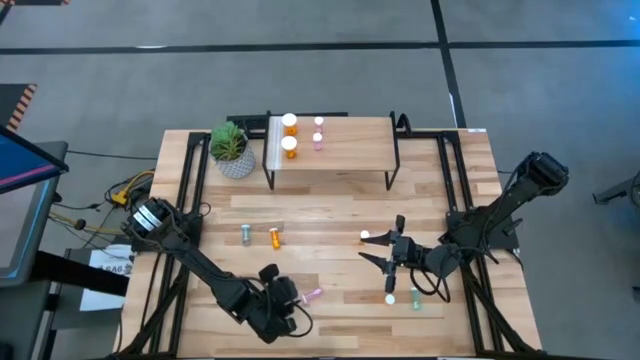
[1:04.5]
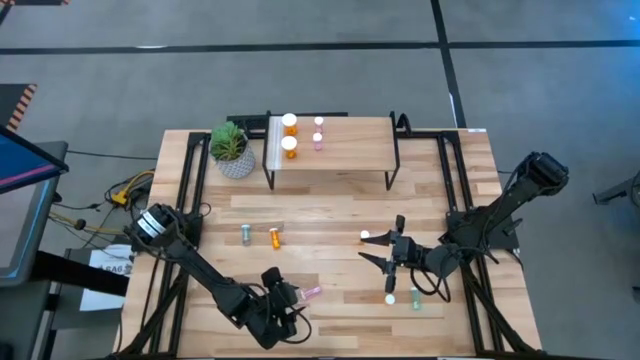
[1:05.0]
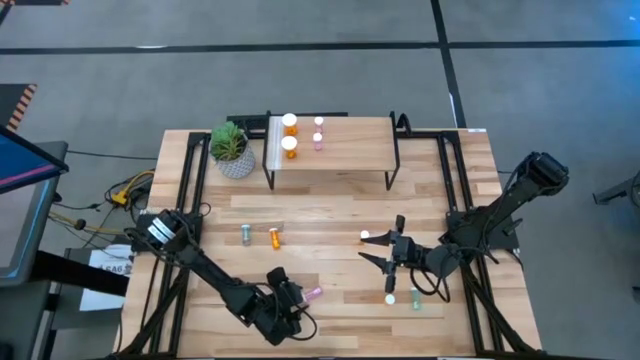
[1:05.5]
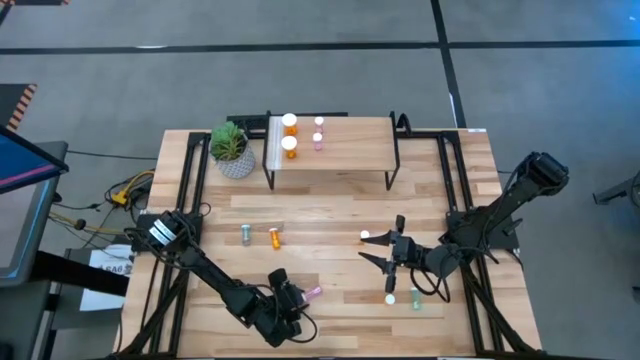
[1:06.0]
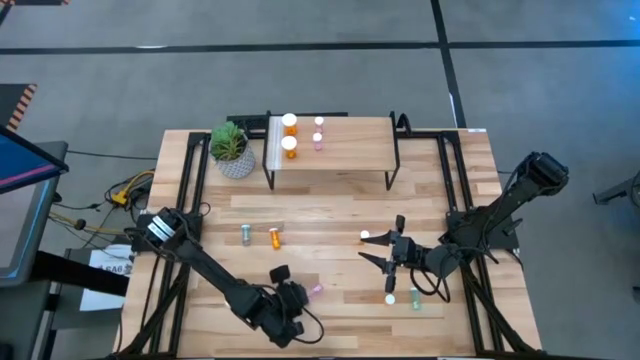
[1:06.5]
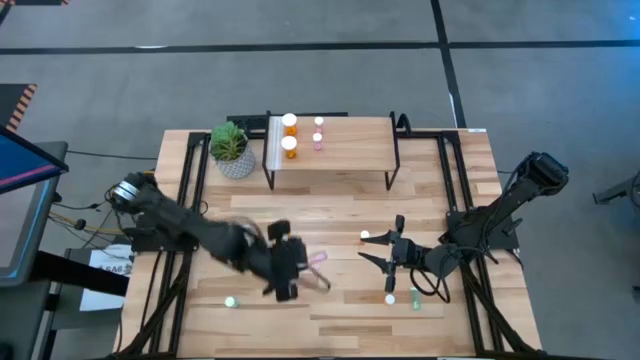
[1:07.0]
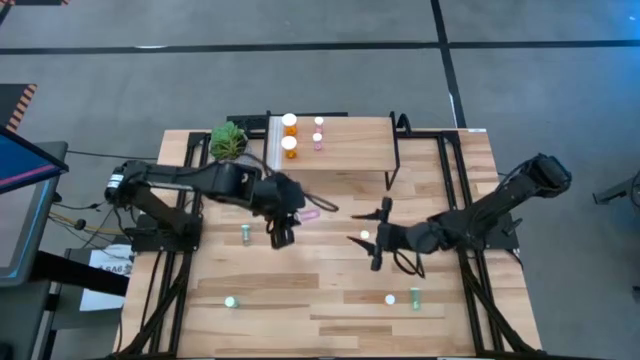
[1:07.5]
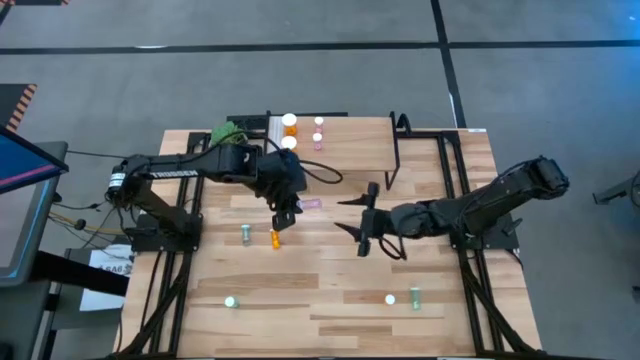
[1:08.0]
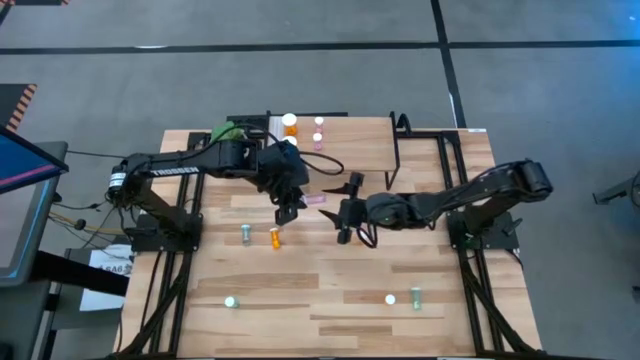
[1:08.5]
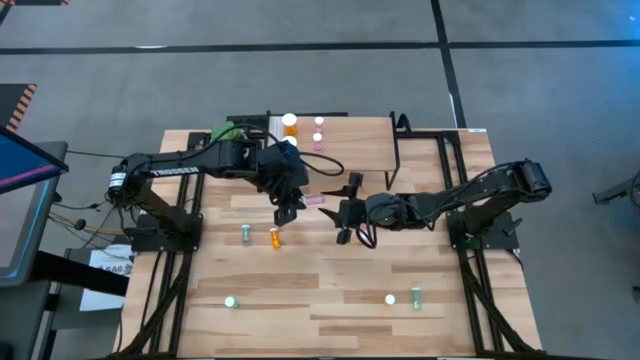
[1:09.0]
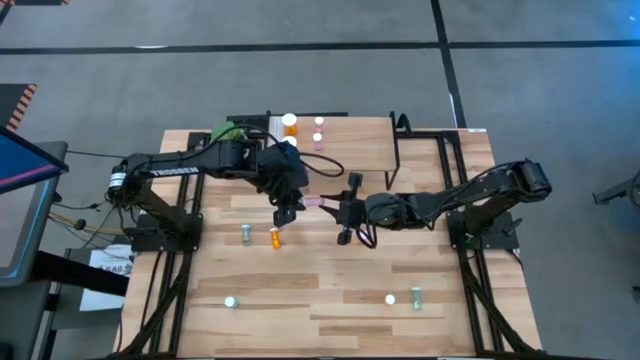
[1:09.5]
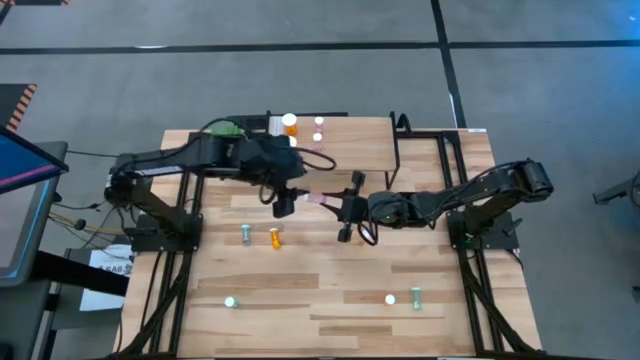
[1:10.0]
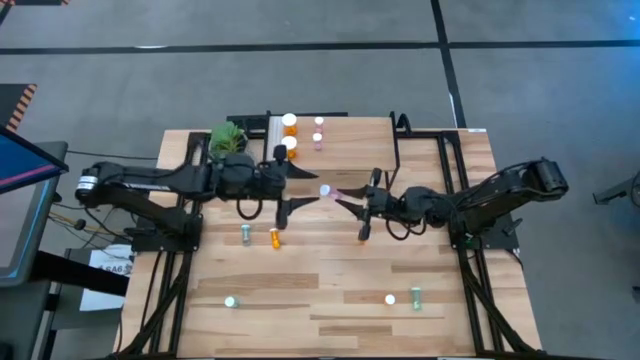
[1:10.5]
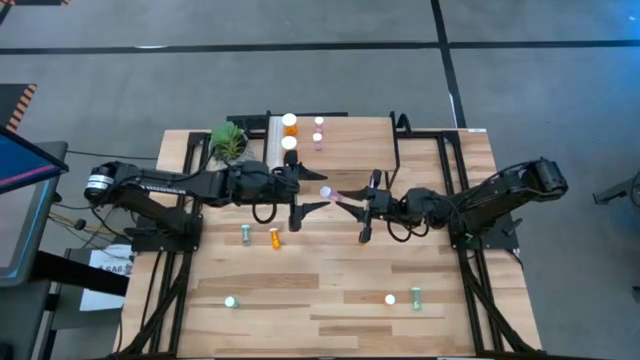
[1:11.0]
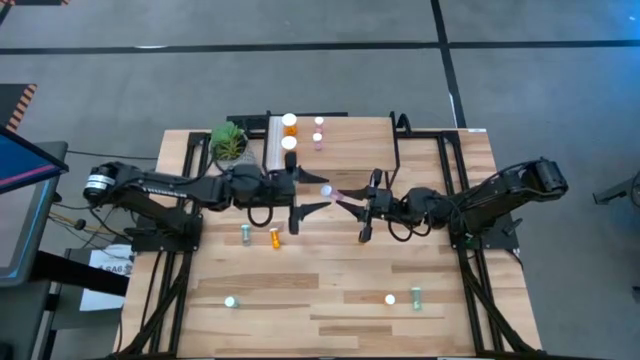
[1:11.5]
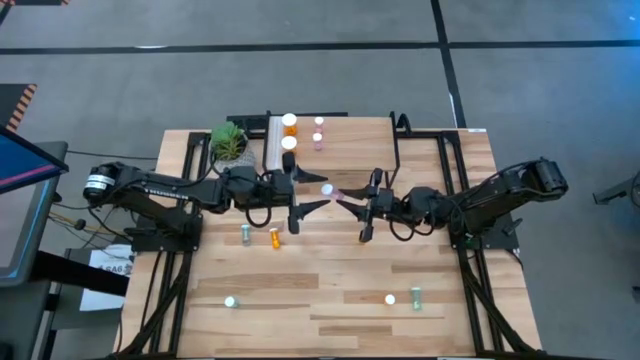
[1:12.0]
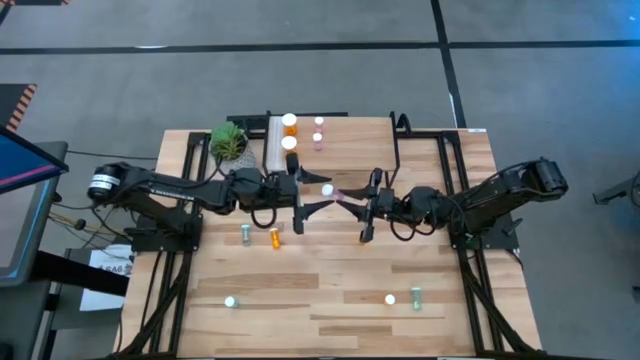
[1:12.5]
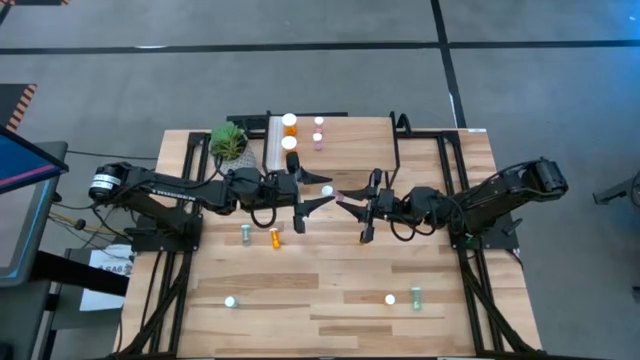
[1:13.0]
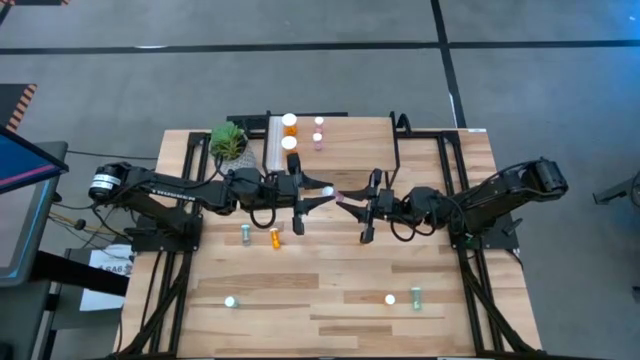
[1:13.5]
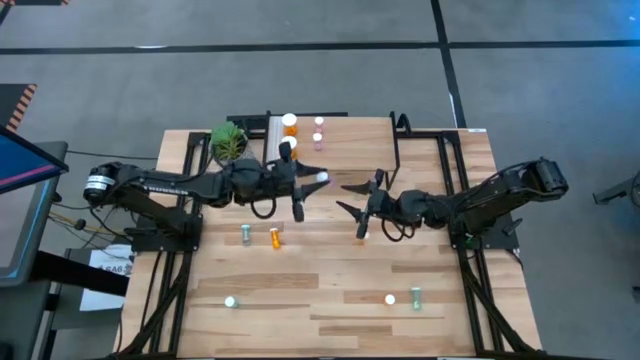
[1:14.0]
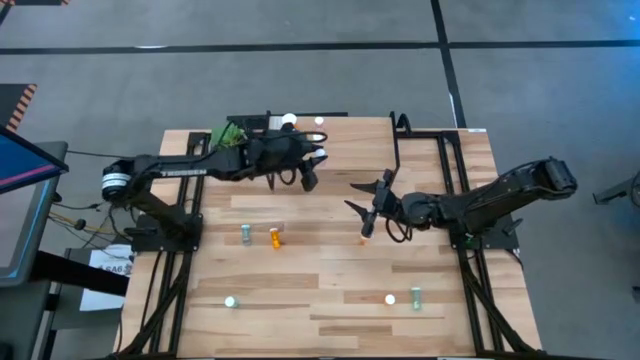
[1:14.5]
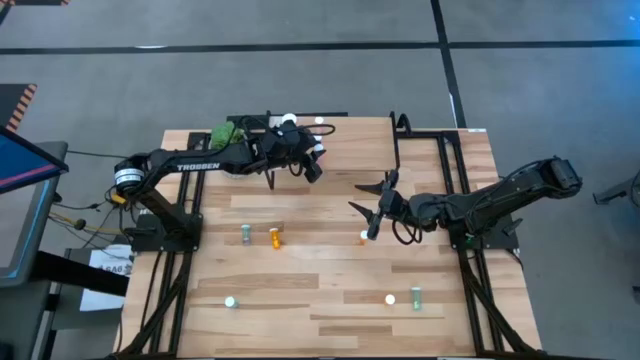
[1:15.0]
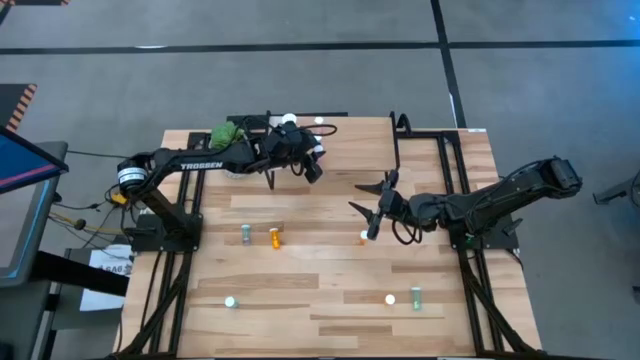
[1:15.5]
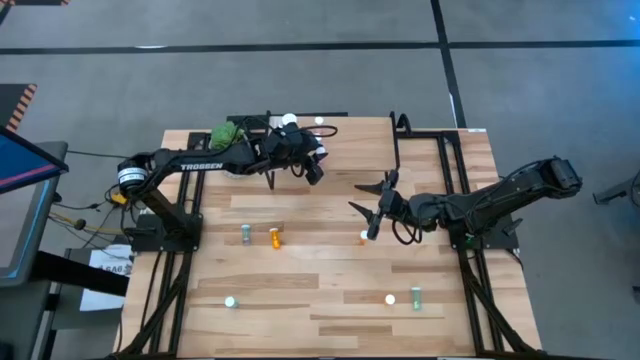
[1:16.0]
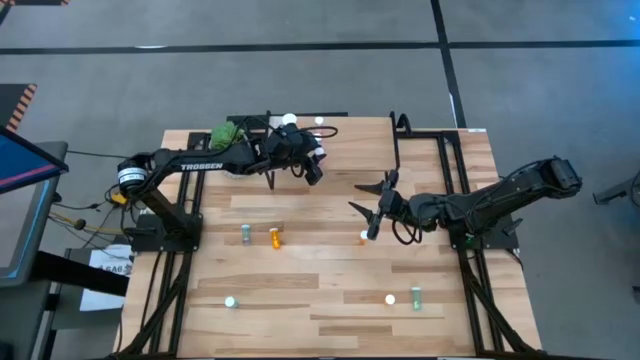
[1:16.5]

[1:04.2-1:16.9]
Task: Pick and place medicine bottles onto shelf by color
Put the pink bottle aligned with the other pink pill bottle on the shelf

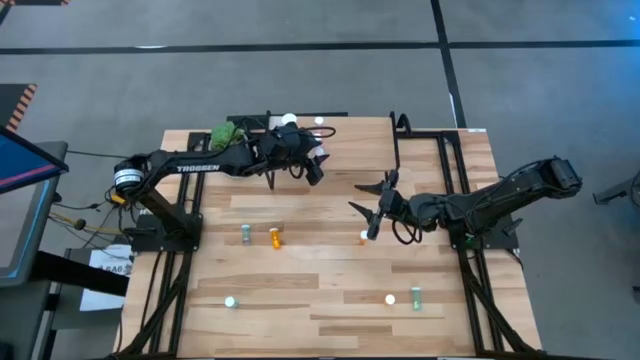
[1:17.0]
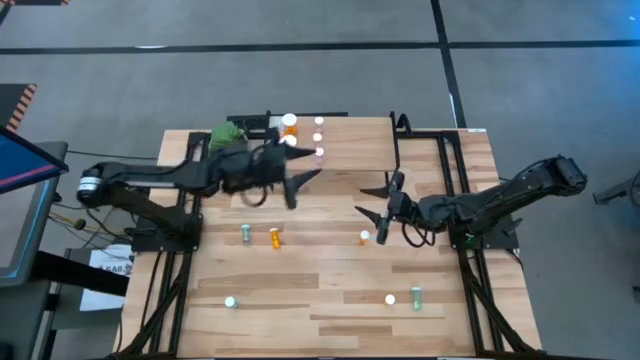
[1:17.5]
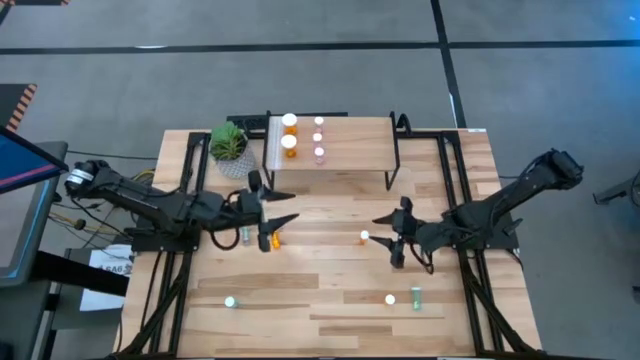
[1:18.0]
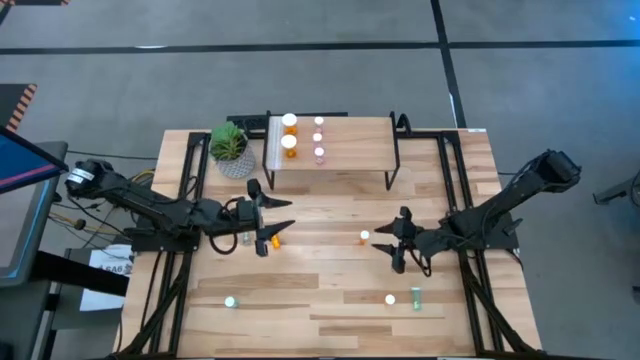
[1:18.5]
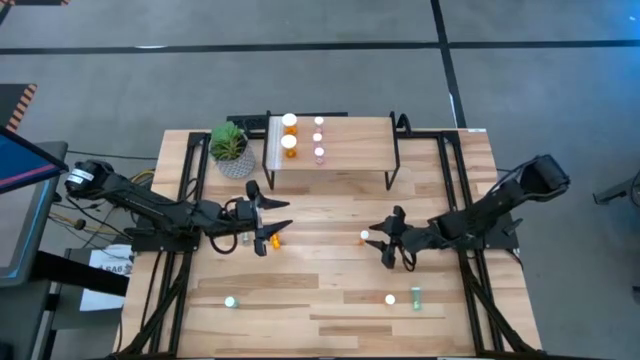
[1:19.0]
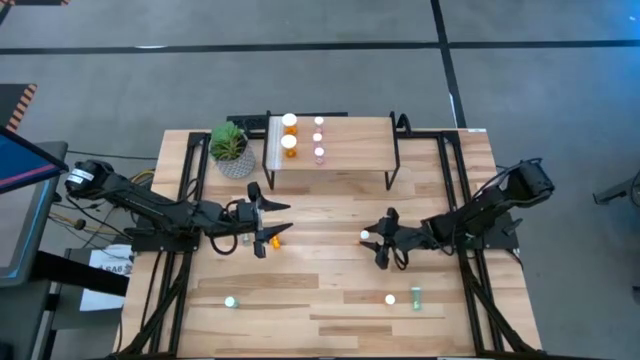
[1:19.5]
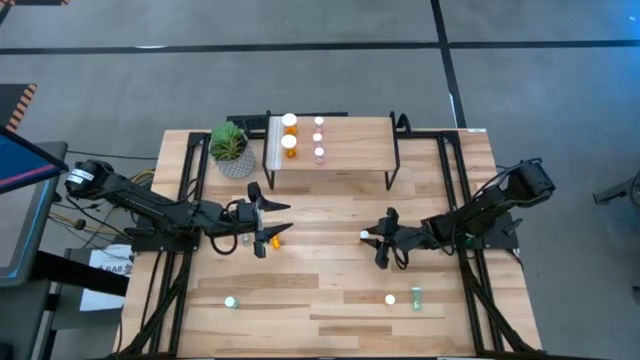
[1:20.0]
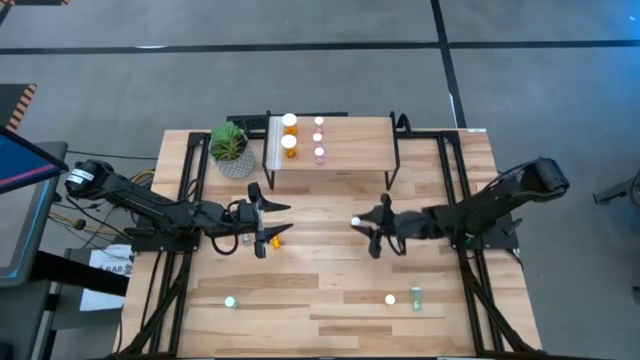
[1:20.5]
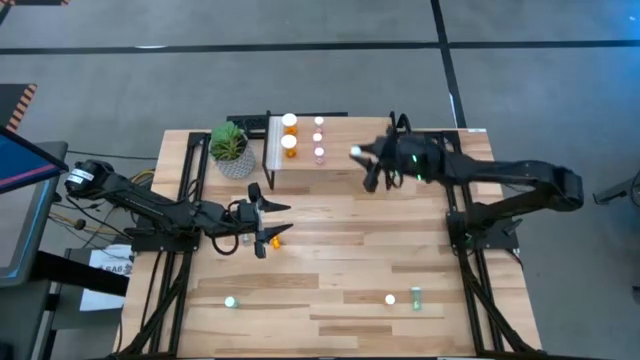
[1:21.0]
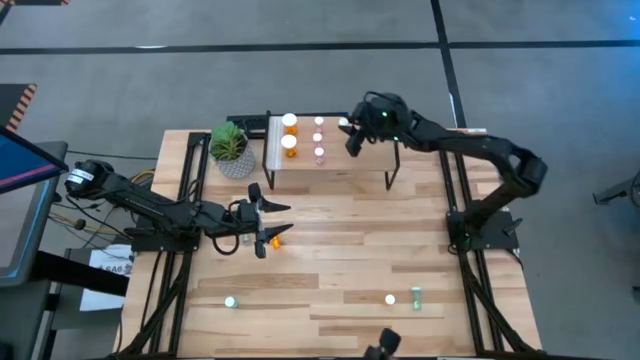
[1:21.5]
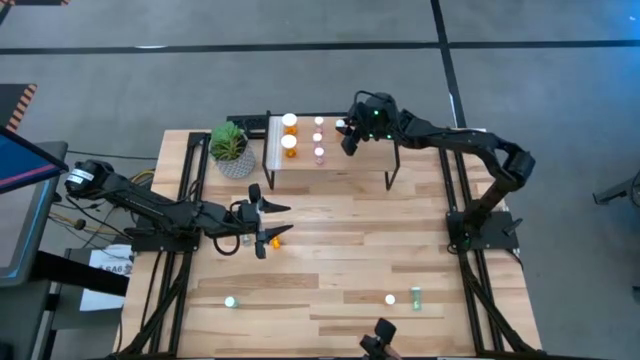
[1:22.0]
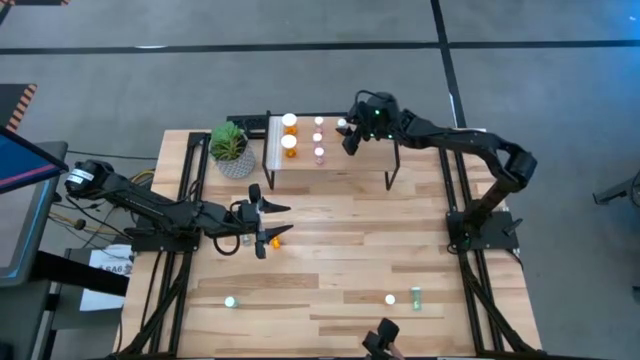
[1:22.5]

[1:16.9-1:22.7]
Put the small right orange pill bottle on the shelf

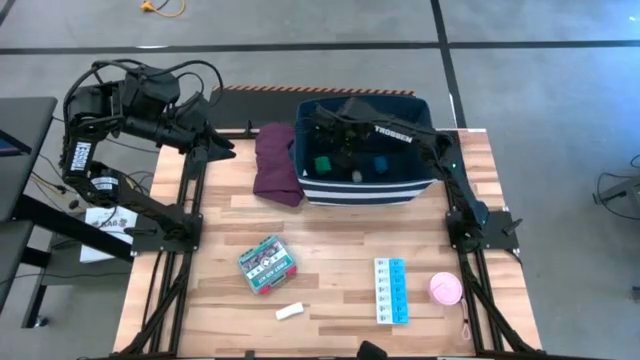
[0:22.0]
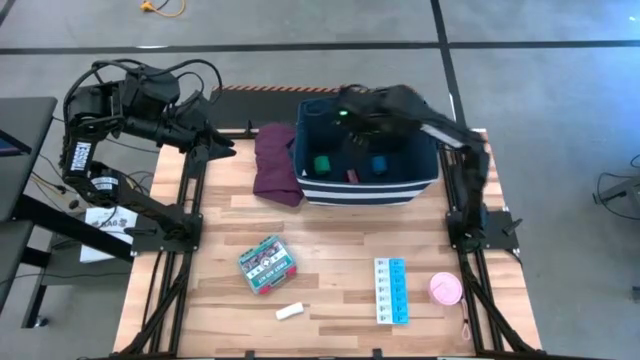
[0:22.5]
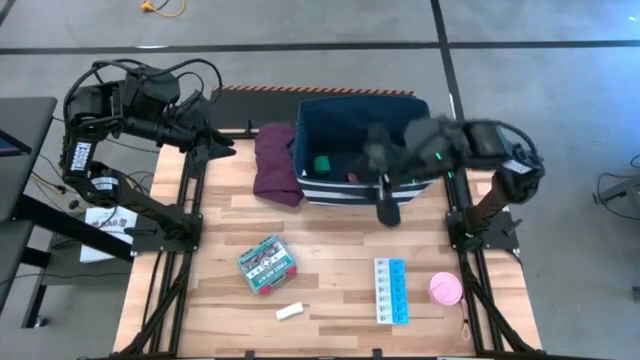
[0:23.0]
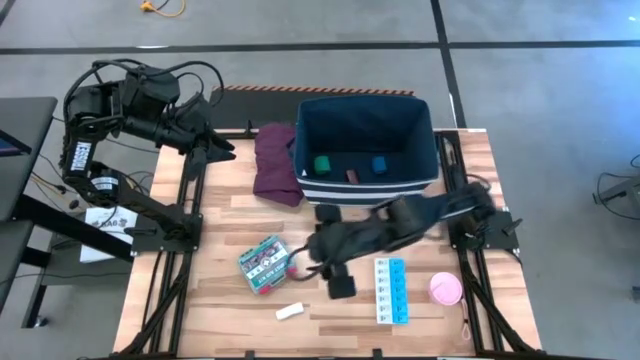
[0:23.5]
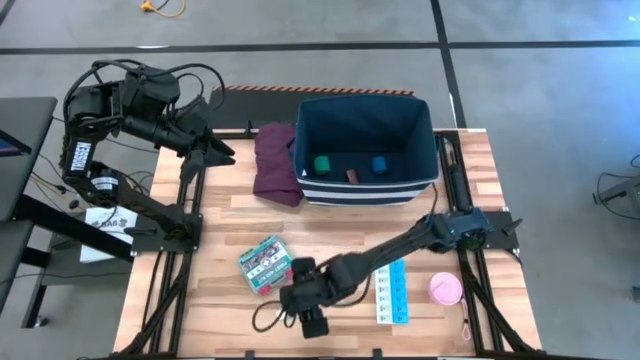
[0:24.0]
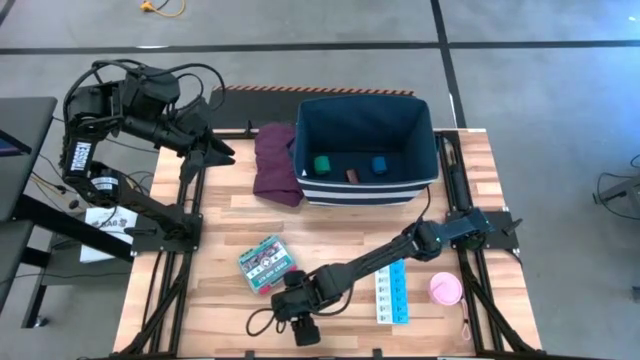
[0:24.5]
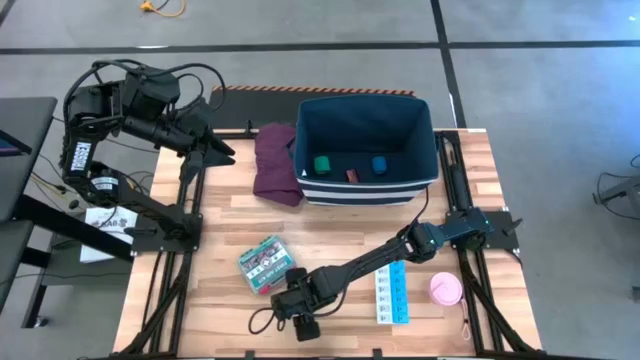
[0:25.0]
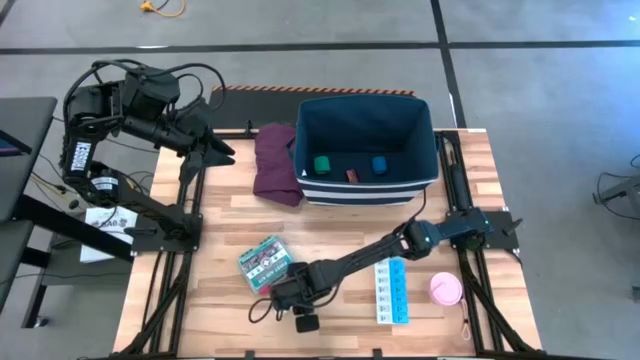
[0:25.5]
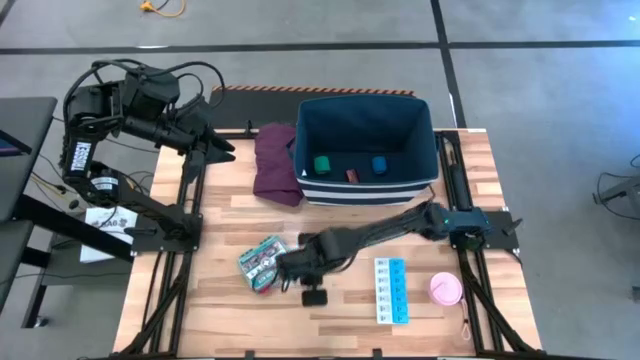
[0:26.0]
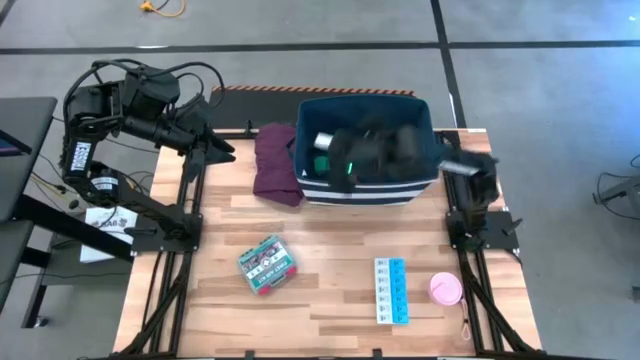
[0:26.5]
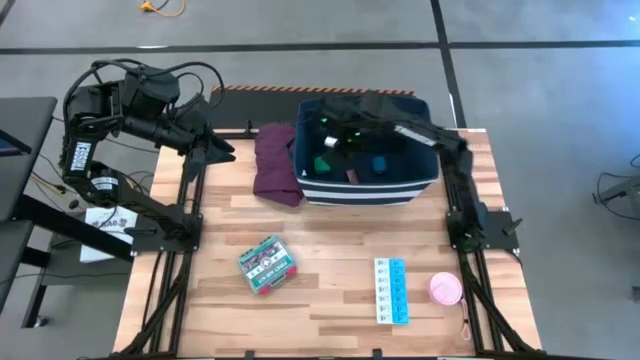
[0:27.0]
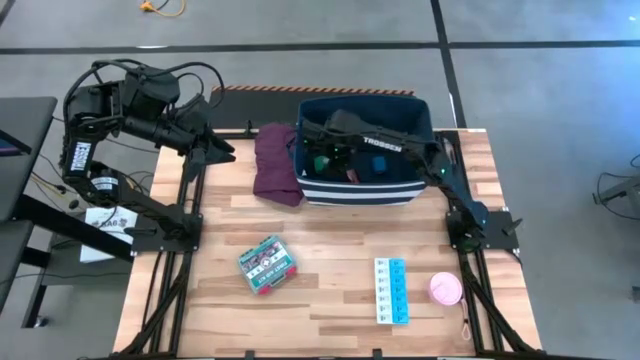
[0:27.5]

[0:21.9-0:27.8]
Task: Pick & place medical supplies in basket/bin
Put the white rolled gauze into the blue organizer
